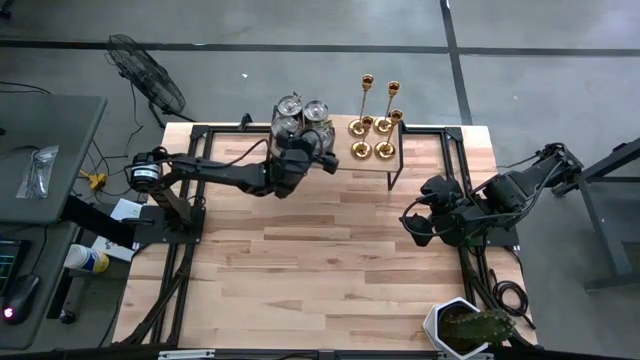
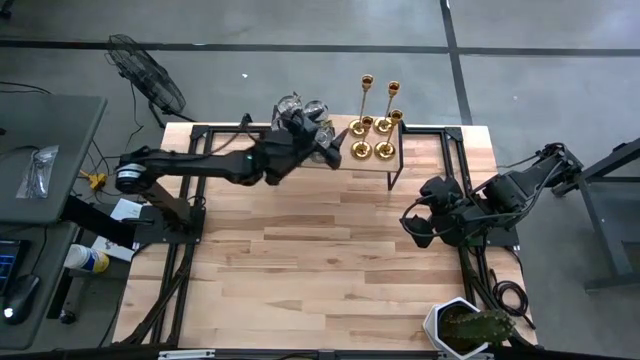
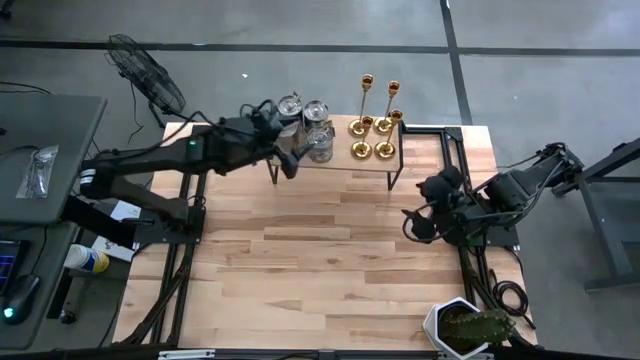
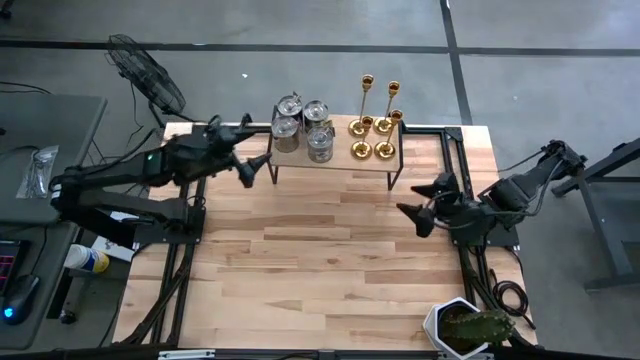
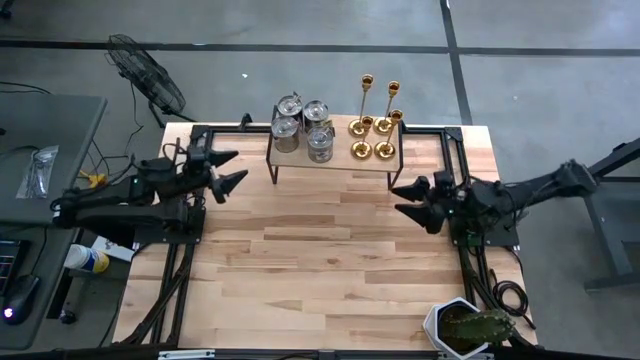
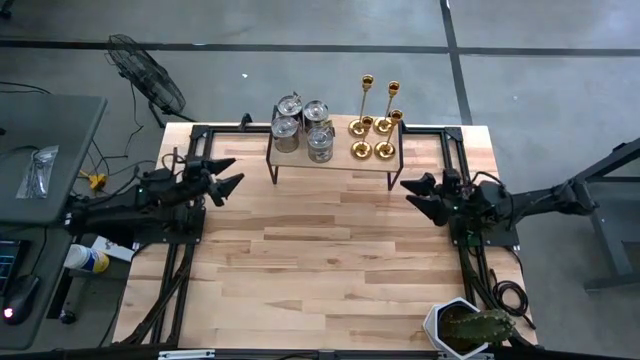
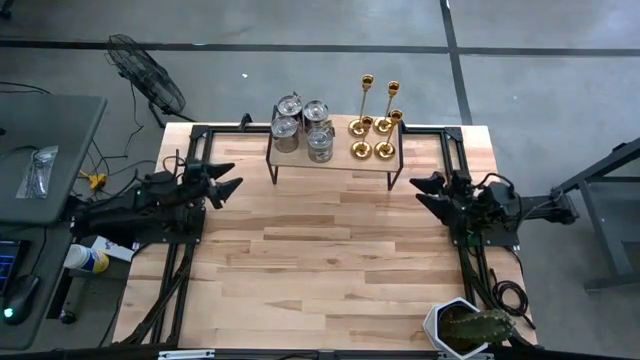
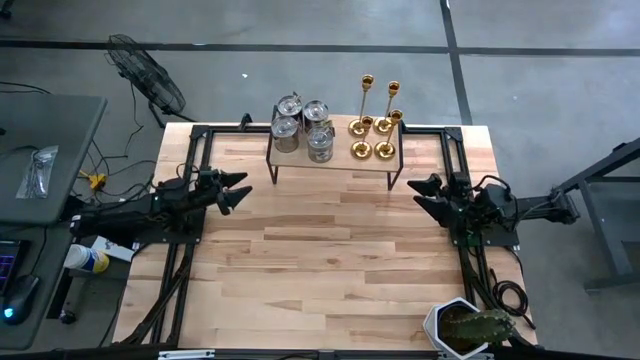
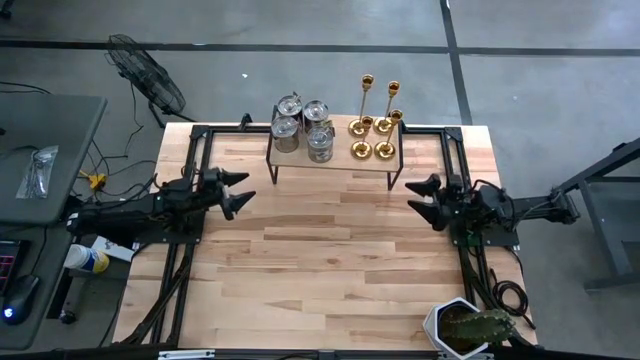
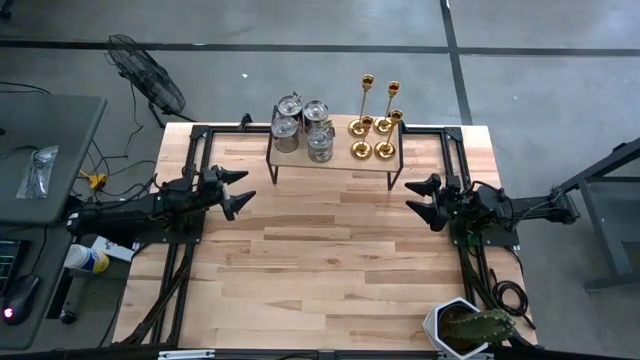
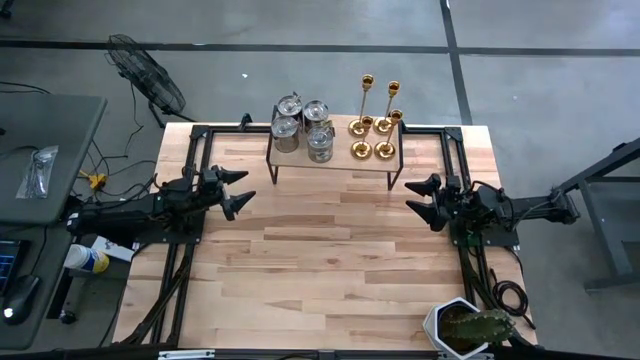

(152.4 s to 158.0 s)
Task: Pick & Place candle stick holders
Return to Home Position

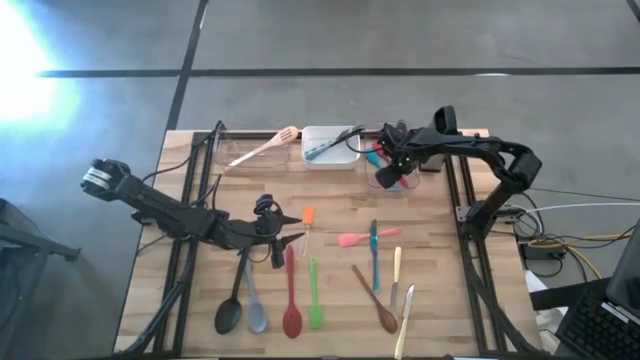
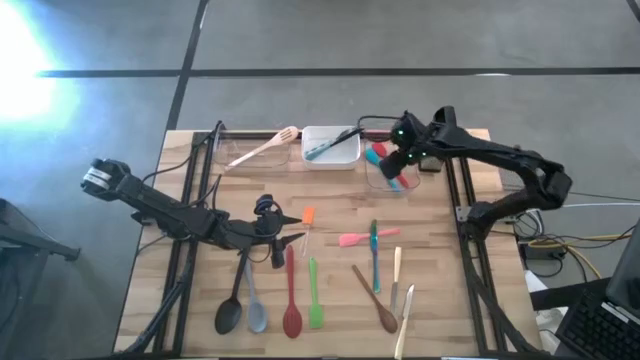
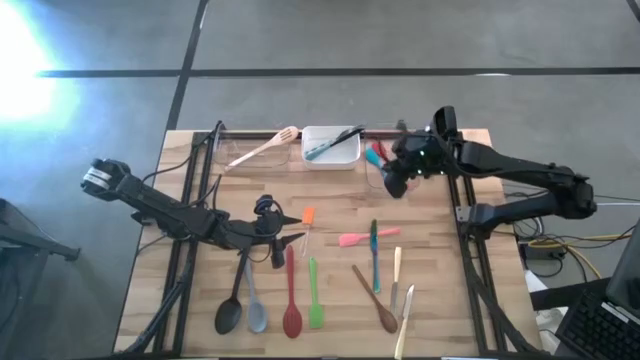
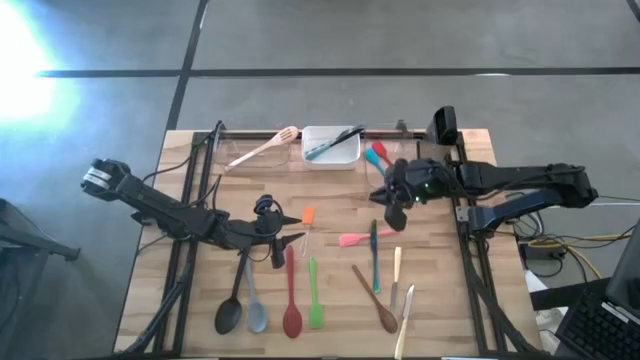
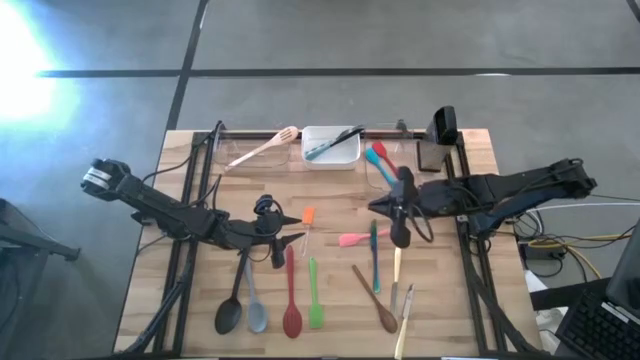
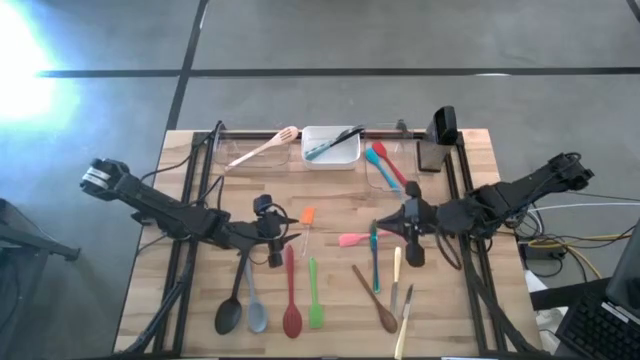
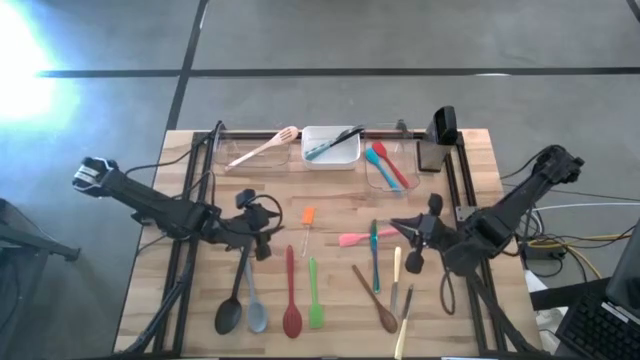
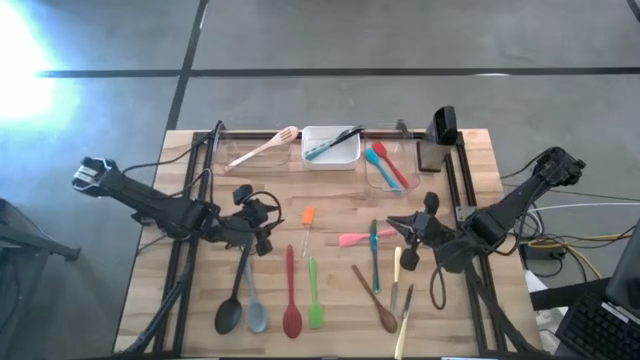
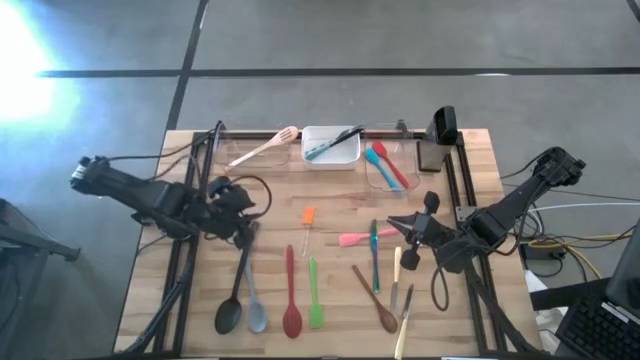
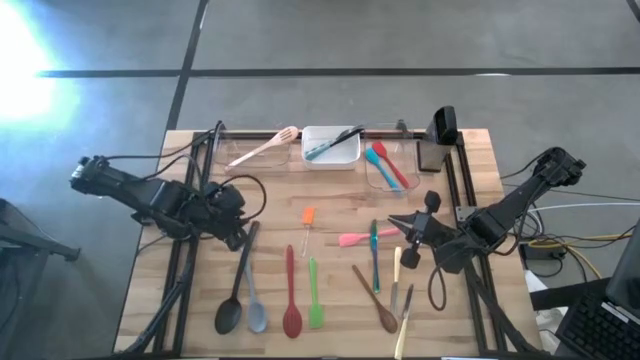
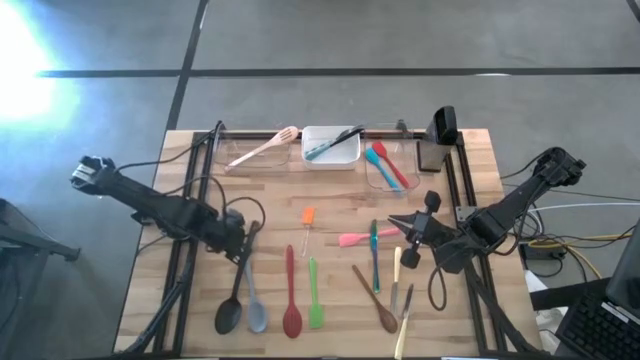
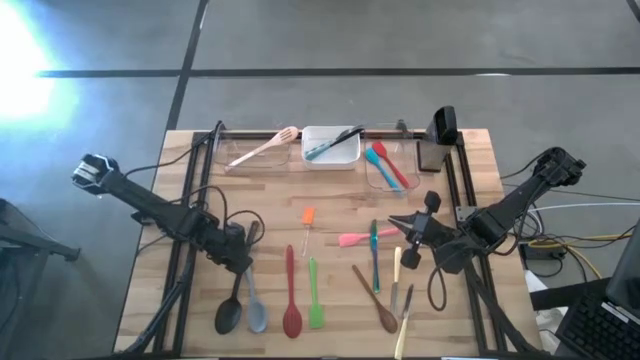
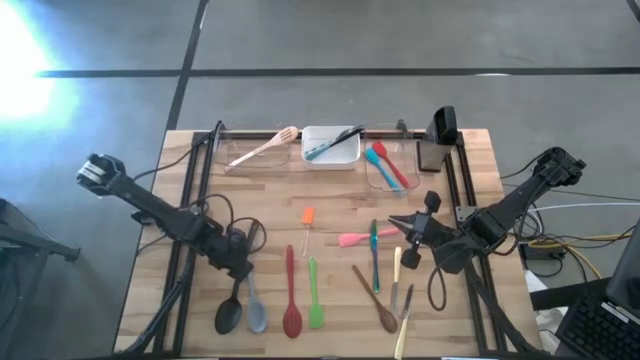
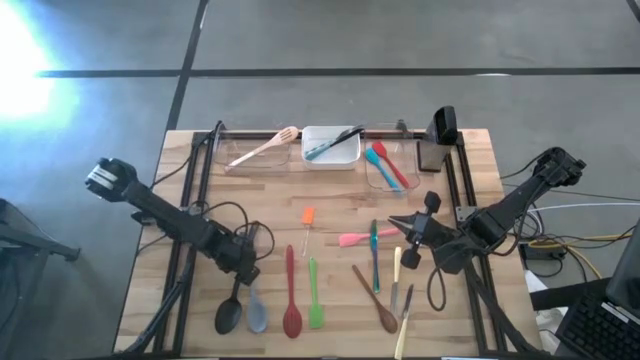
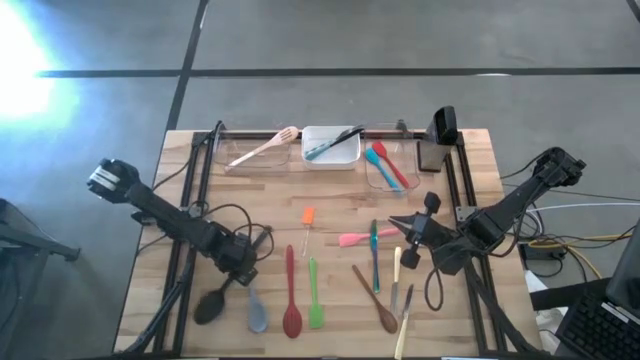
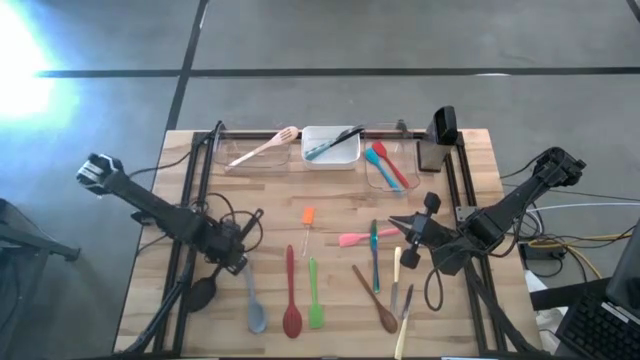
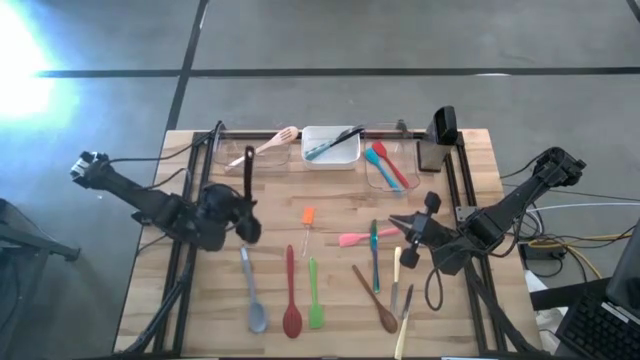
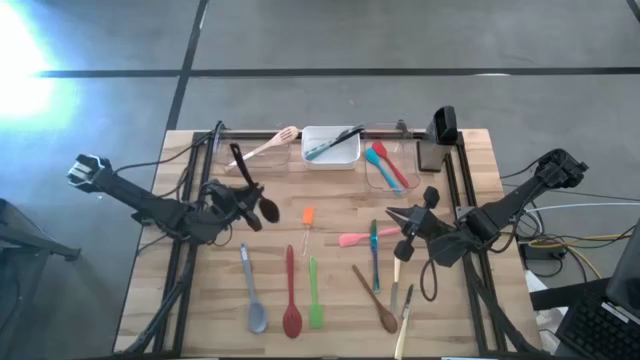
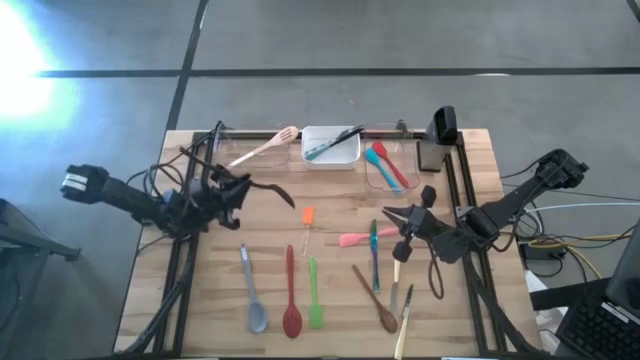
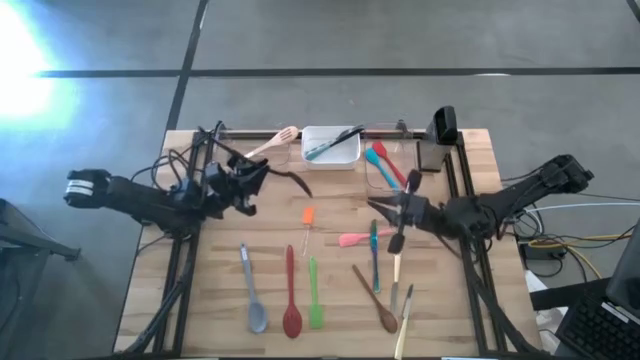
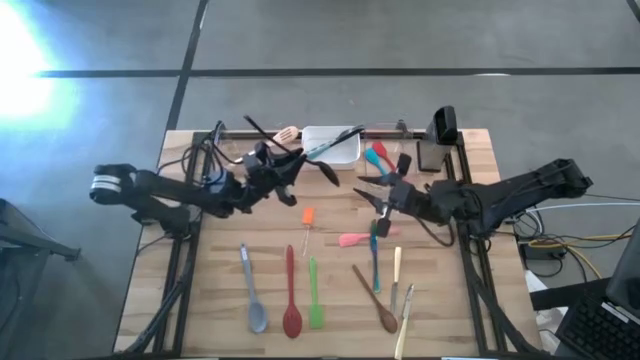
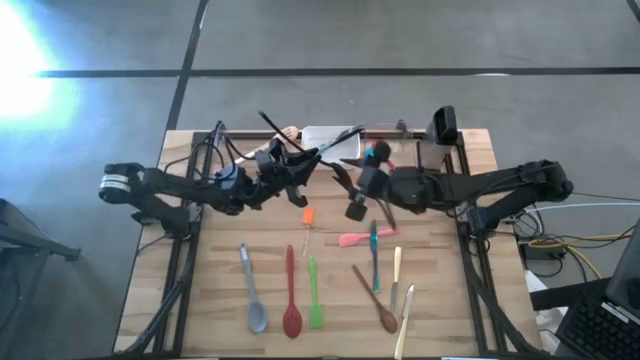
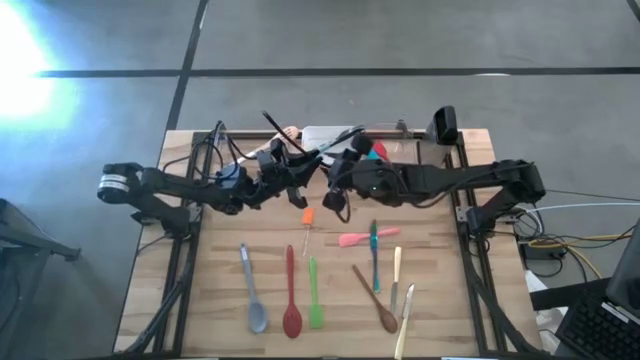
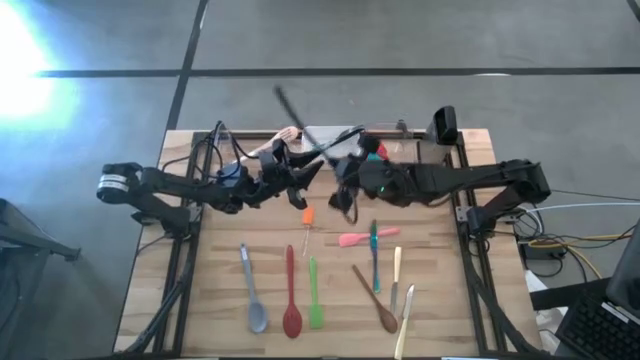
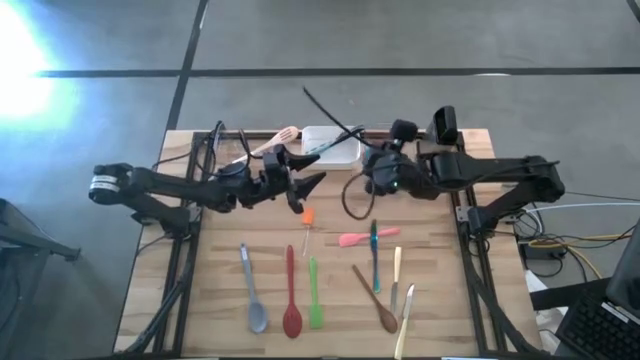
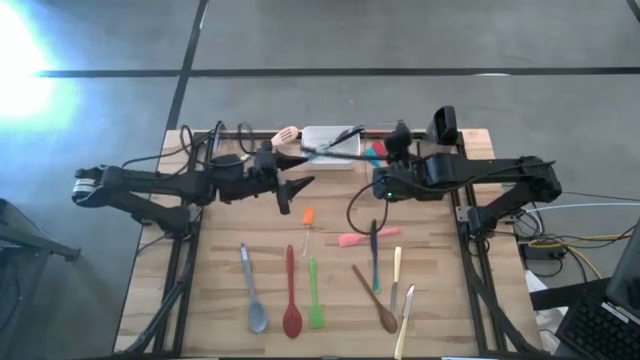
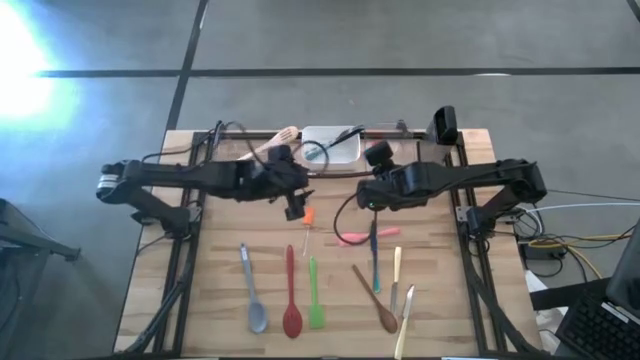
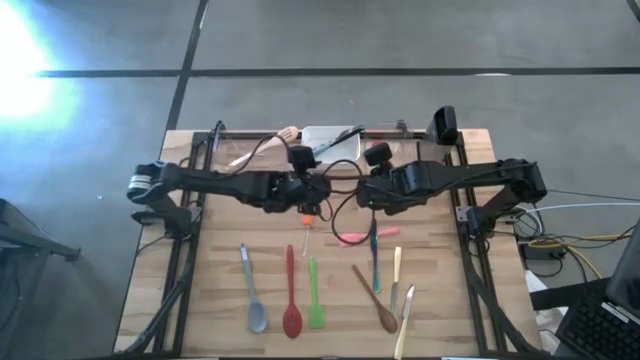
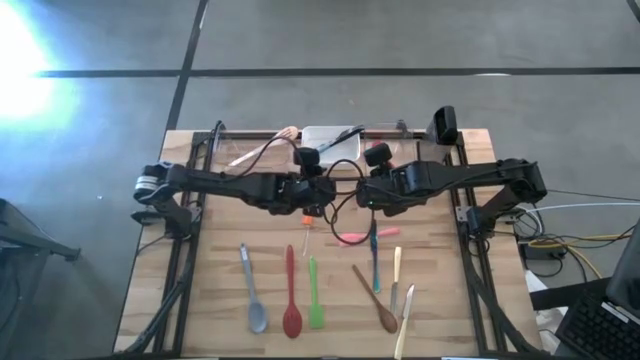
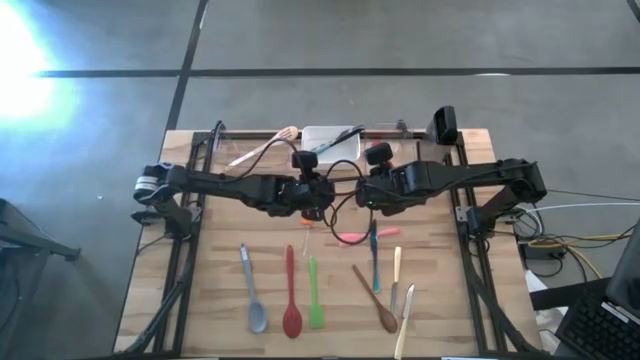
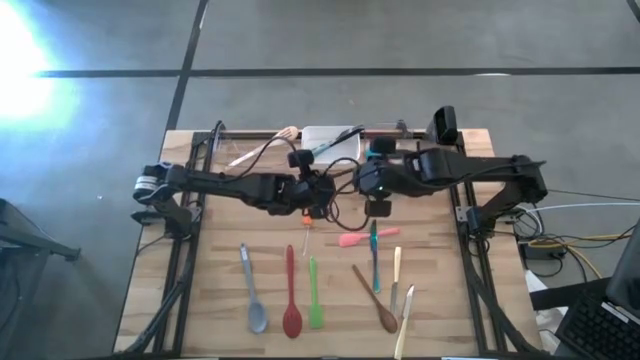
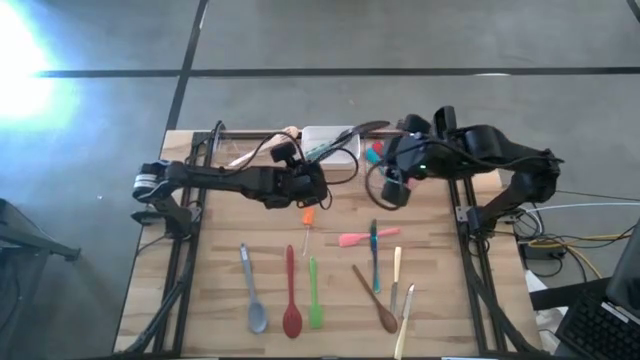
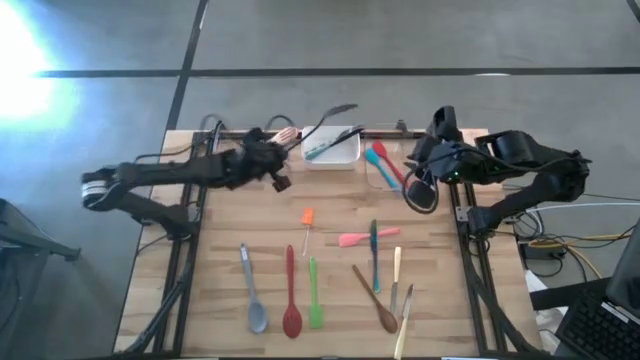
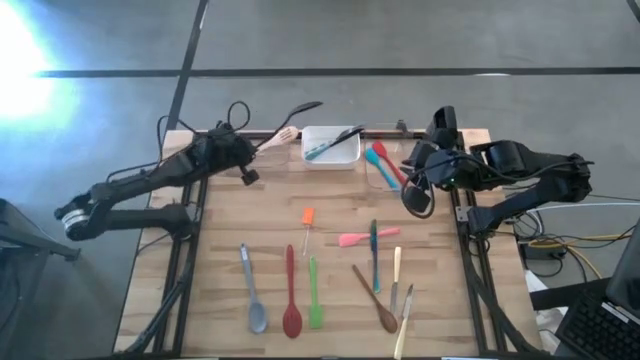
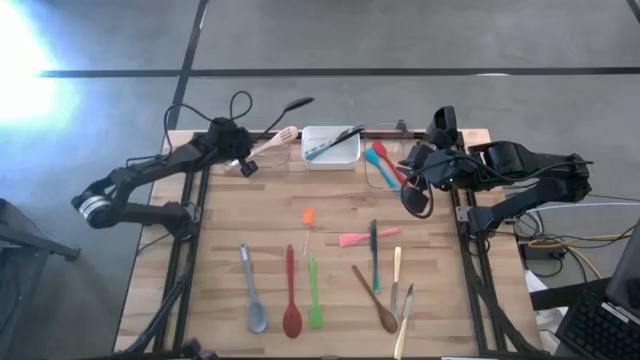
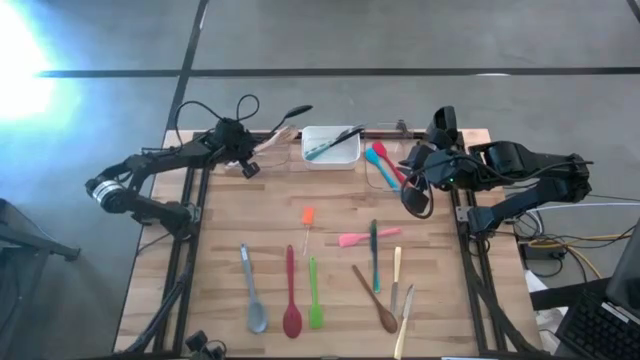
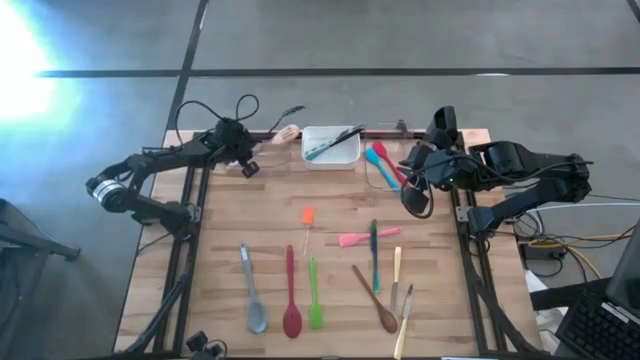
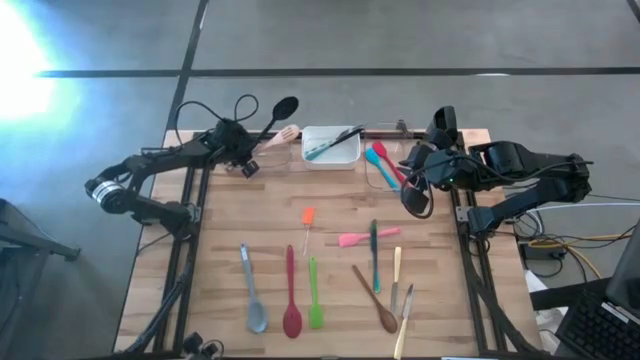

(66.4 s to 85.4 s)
Task: Pick & Place Kitchen Items
Put the black serving spoon into the left transparent bin
